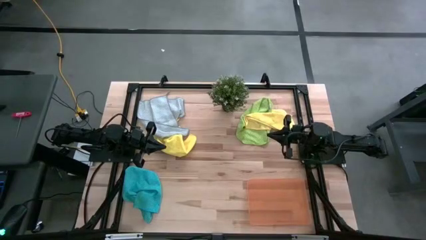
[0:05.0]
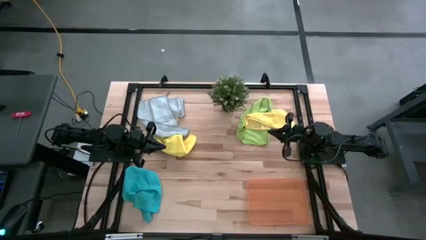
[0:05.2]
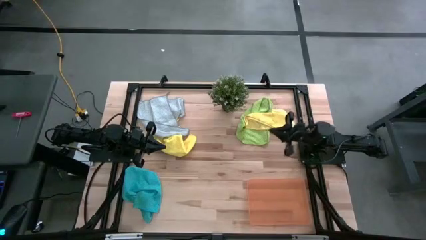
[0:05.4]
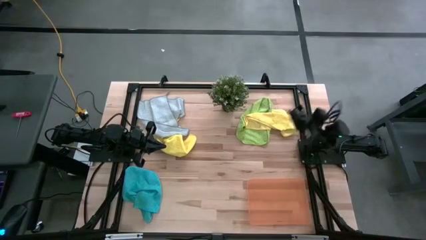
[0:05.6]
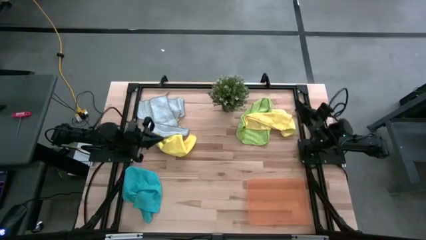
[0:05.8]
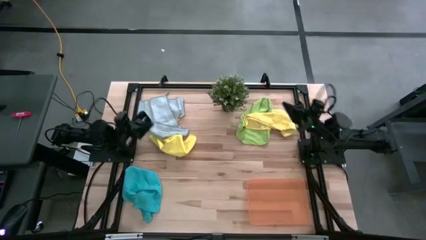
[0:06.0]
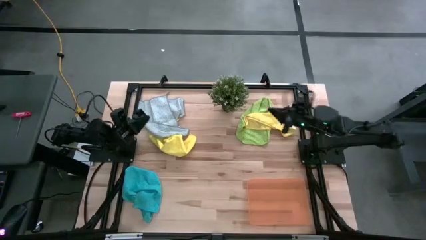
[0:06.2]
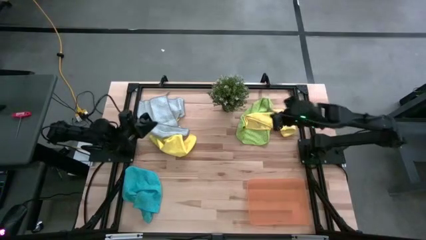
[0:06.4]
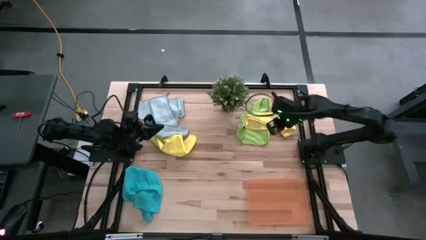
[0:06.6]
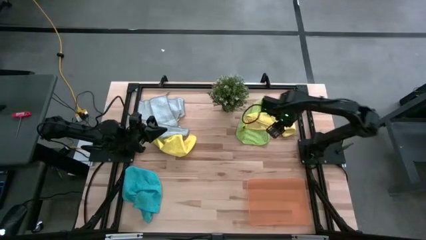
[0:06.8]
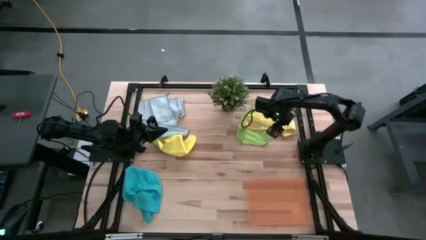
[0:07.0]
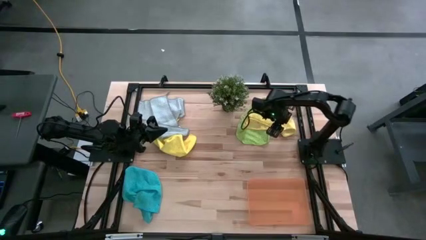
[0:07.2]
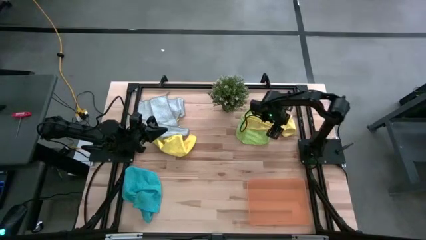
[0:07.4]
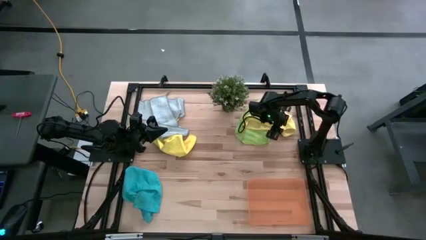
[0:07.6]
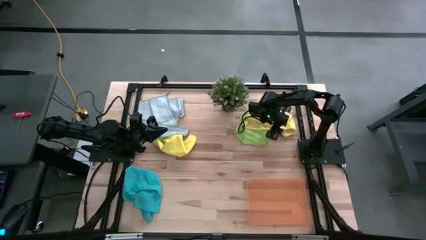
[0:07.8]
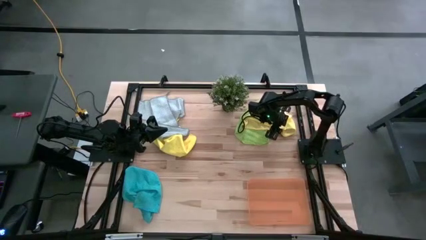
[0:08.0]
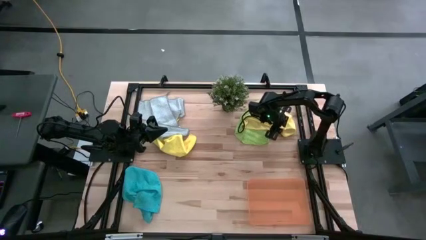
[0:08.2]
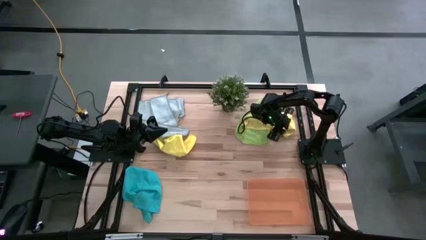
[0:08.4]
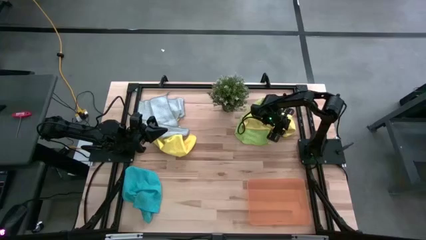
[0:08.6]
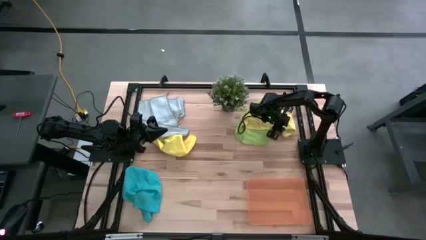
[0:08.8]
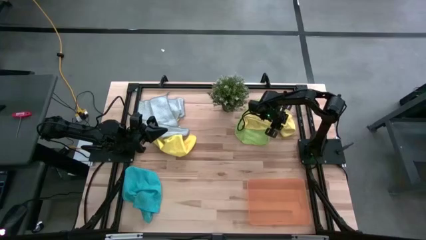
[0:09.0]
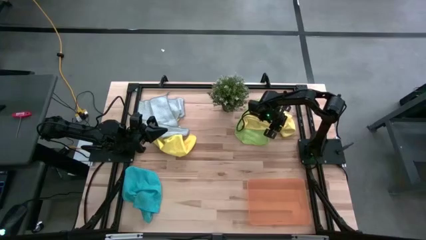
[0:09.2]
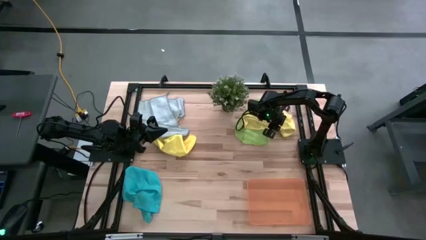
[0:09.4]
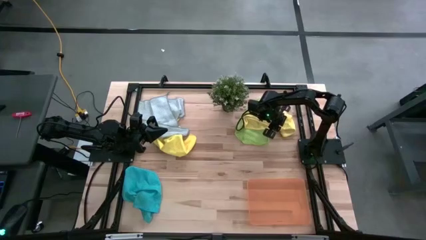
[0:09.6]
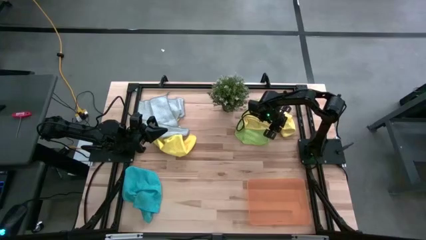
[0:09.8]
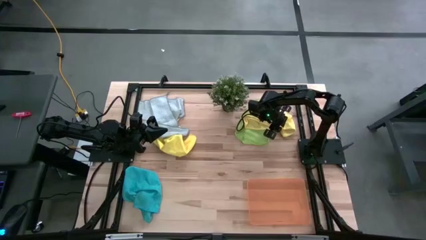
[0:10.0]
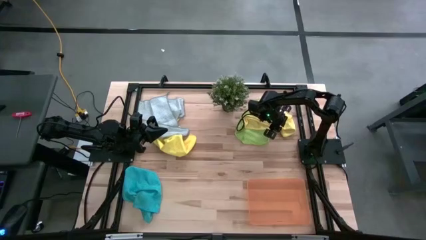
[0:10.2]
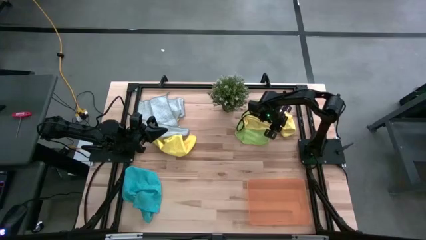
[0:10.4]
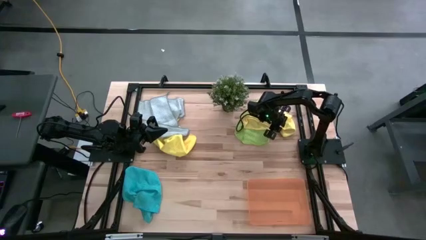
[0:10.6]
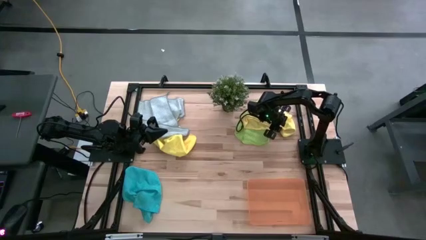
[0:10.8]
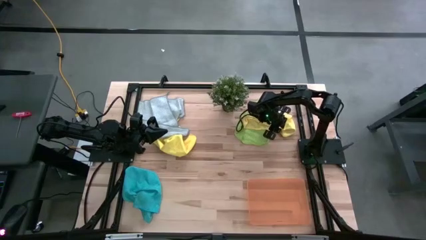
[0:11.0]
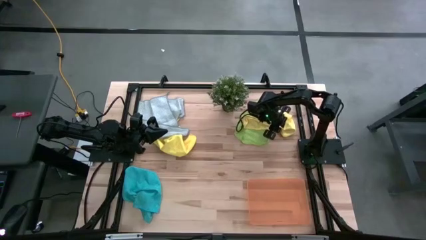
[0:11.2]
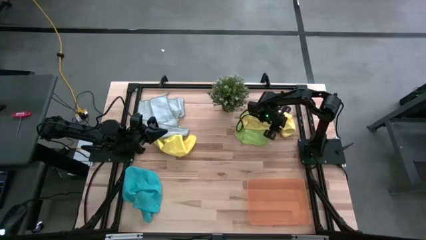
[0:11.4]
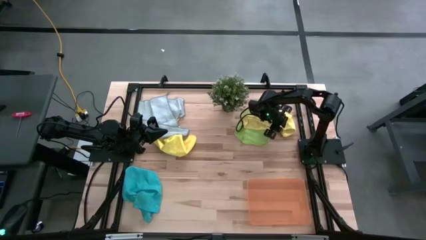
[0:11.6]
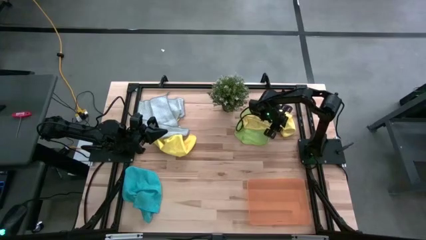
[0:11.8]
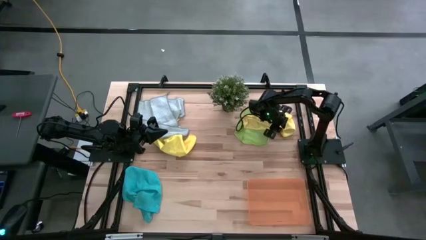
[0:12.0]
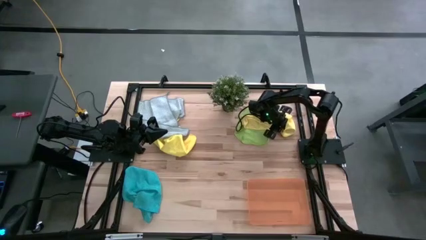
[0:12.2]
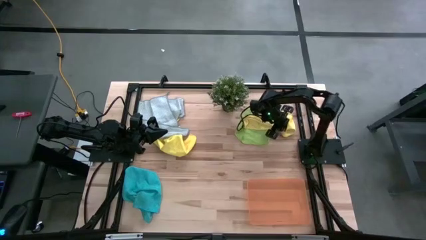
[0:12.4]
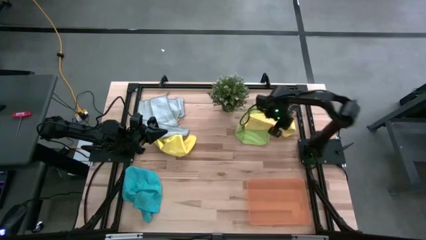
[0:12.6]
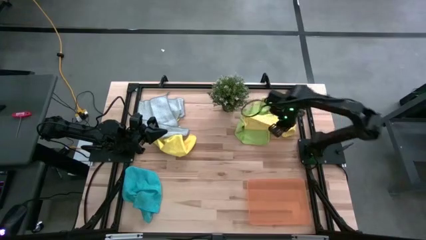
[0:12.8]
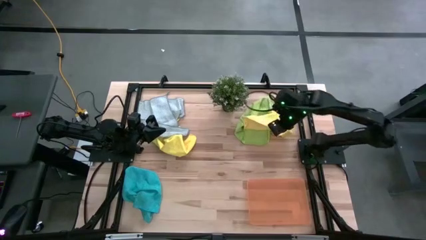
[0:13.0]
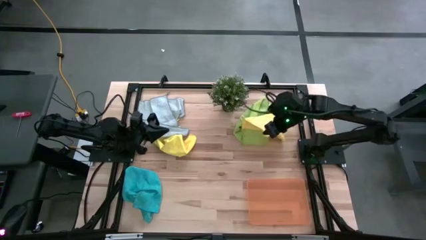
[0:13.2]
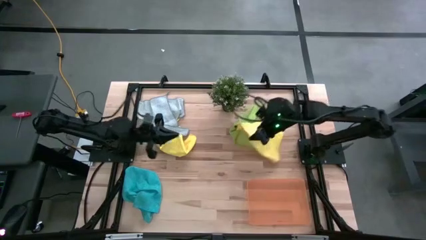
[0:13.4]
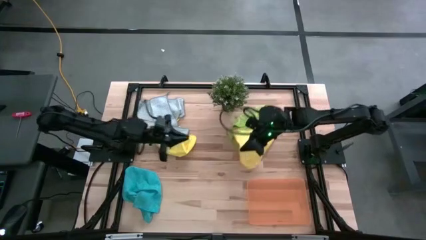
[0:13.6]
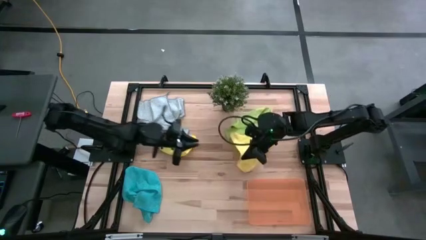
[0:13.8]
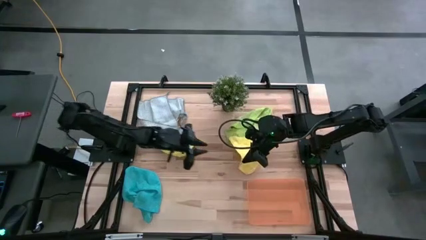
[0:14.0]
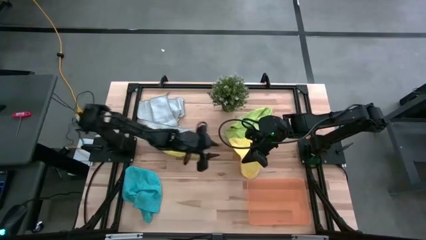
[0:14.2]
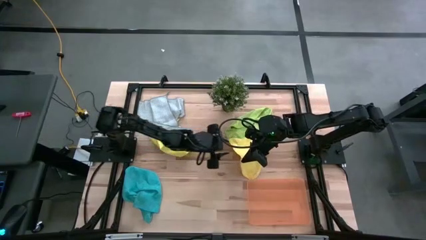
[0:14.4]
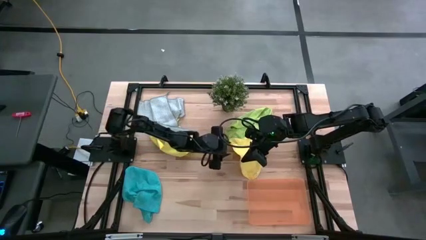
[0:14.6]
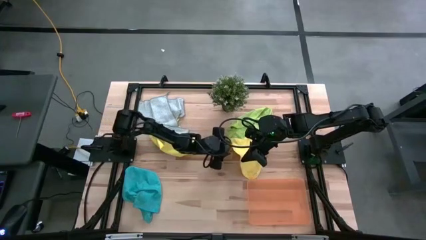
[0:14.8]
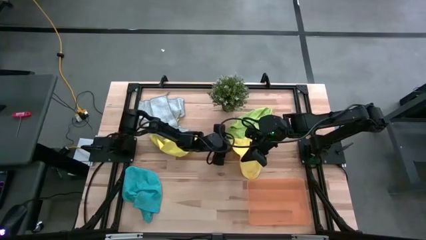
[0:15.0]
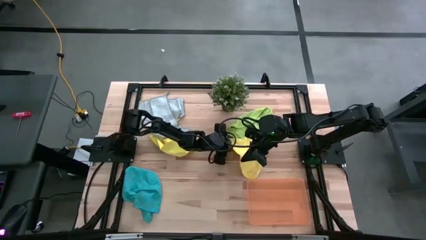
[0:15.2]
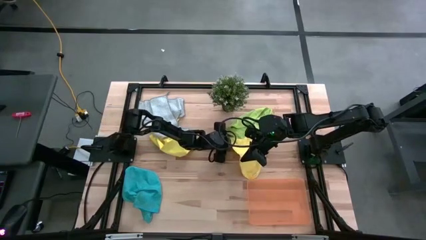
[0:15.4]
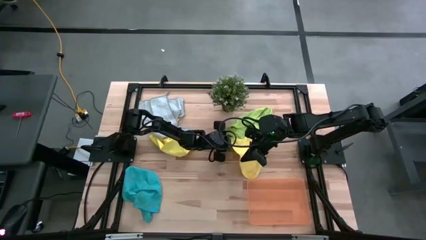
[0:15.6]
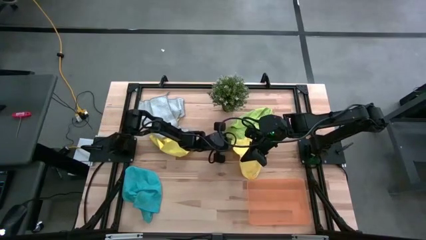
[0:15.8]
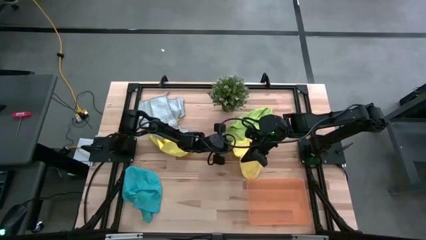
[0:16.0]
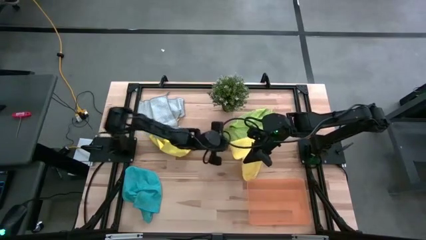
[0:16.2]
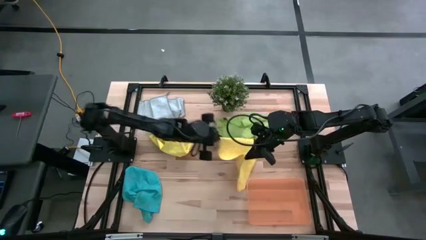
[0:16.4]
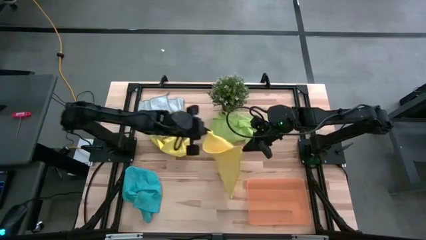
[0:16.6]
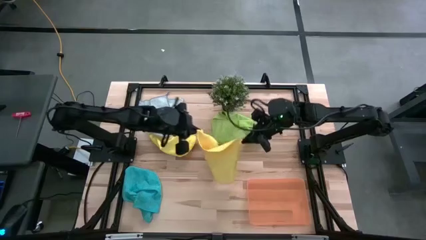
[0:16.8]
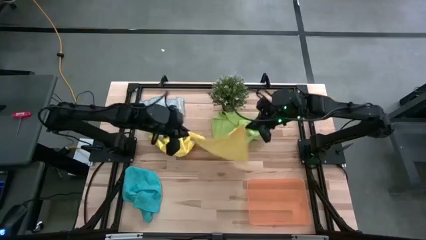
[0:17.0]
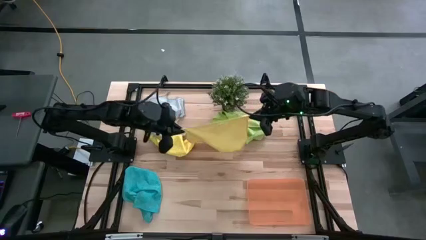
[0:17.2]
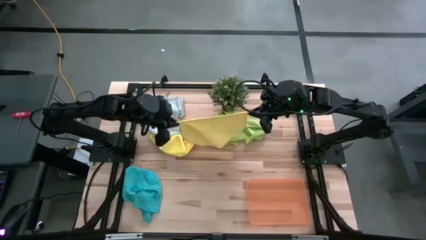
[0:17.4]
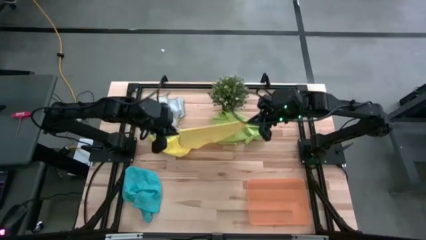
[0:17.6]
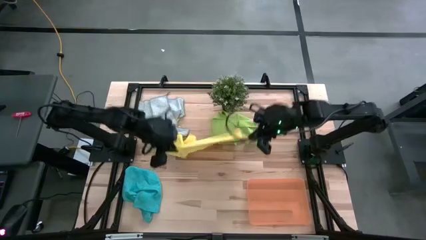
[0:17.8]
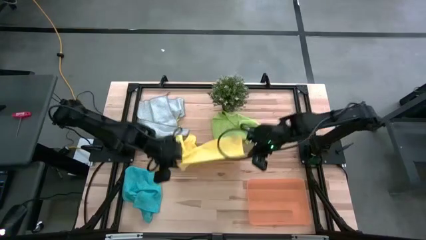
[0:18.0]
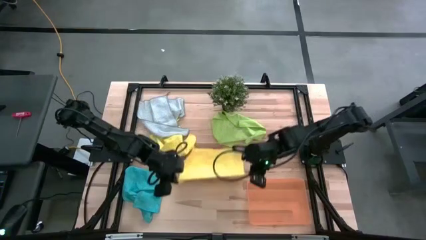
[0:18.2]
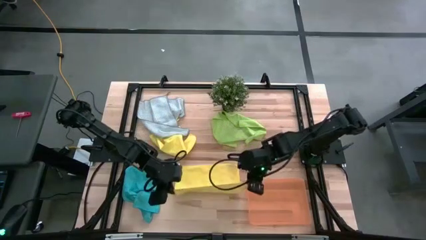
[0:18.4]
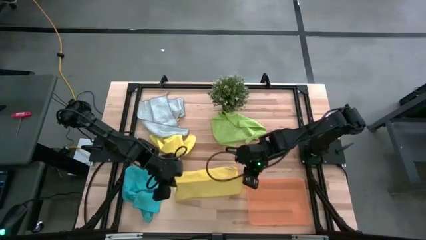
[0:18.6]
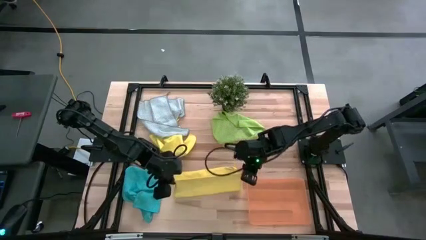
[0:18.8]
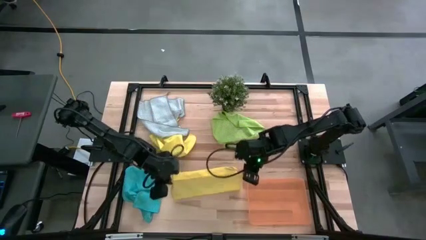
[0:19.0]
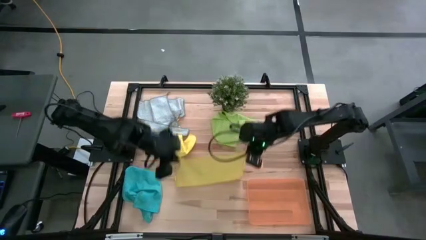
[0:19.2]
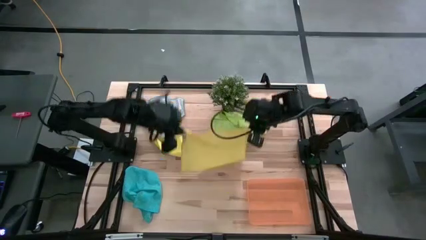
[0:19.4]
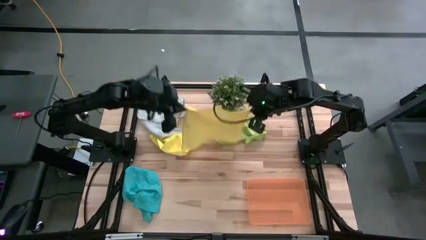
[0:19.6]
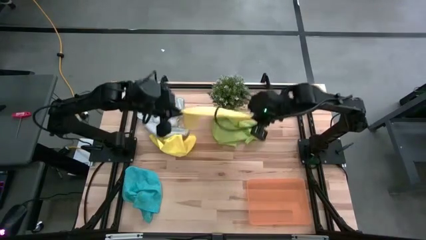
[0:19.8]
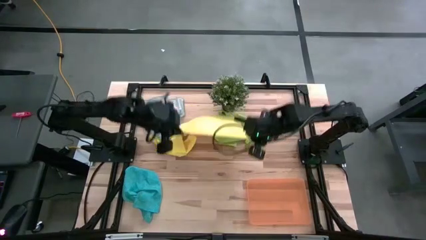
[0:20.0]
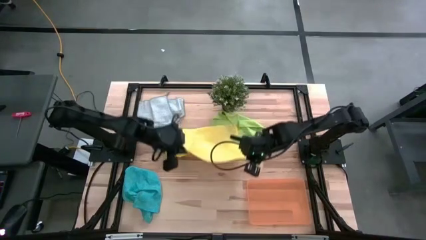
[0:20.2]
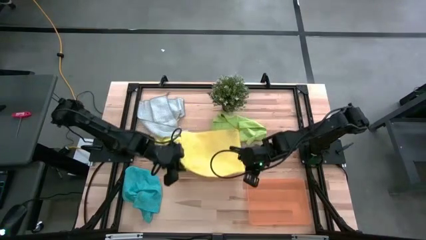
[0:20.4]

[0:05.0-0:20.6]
Task: Fold microfiber towels
Fold the right yellow microfiber towel
